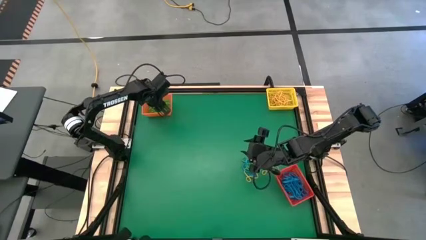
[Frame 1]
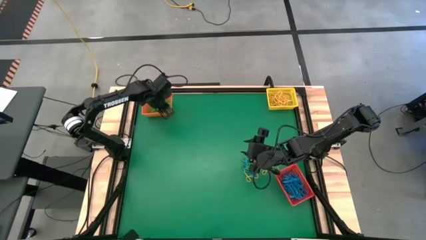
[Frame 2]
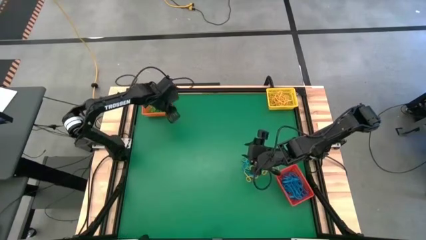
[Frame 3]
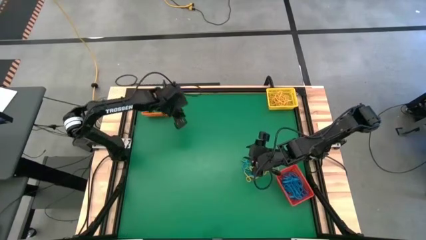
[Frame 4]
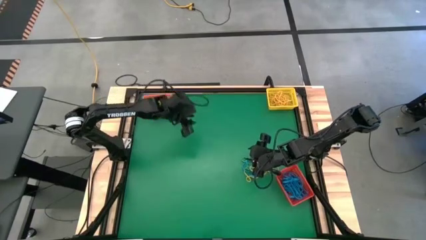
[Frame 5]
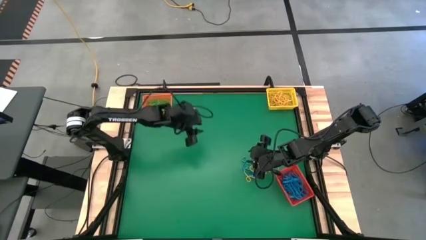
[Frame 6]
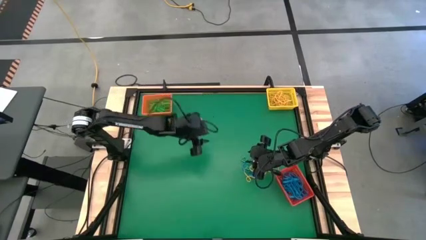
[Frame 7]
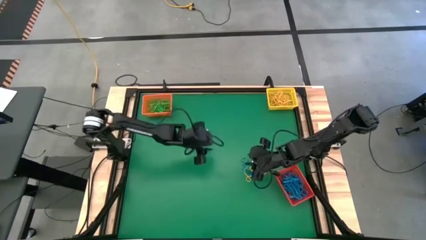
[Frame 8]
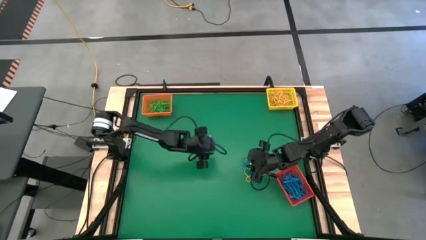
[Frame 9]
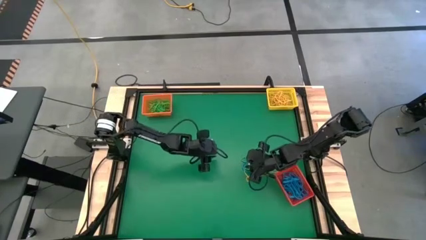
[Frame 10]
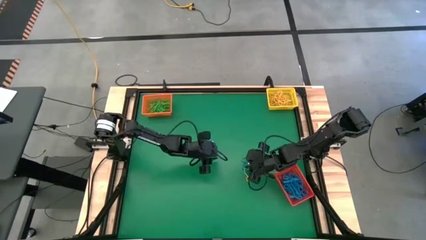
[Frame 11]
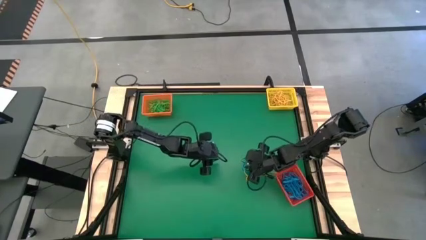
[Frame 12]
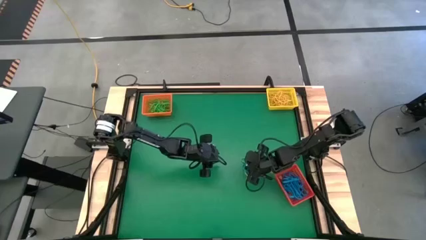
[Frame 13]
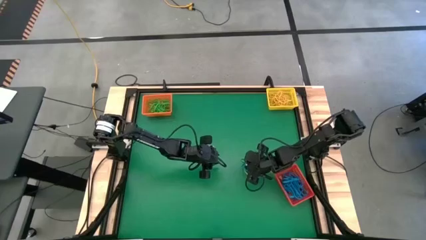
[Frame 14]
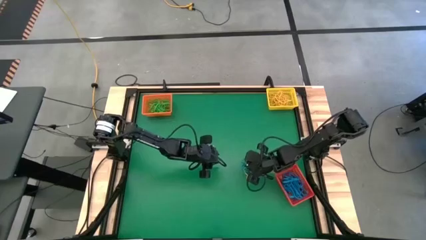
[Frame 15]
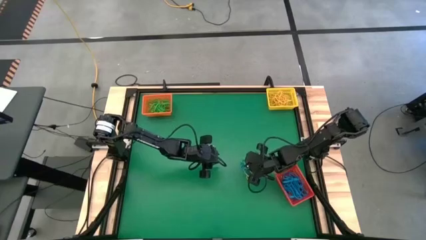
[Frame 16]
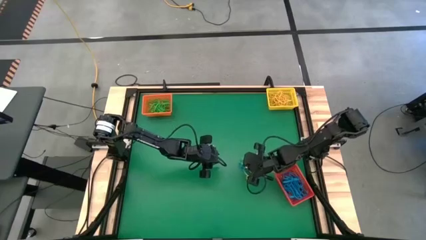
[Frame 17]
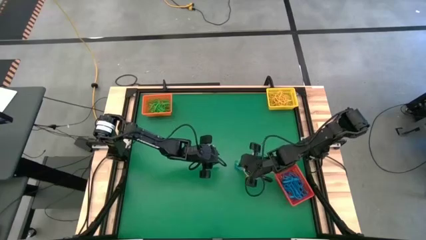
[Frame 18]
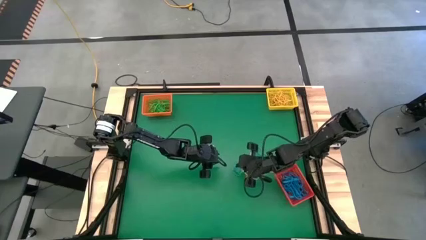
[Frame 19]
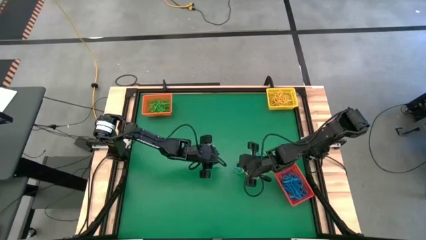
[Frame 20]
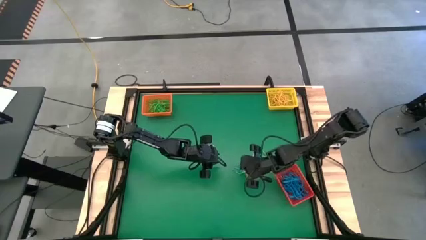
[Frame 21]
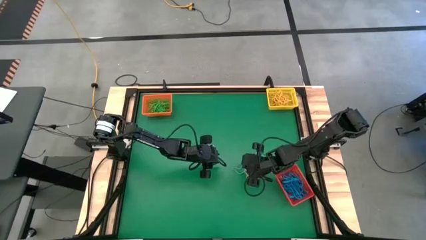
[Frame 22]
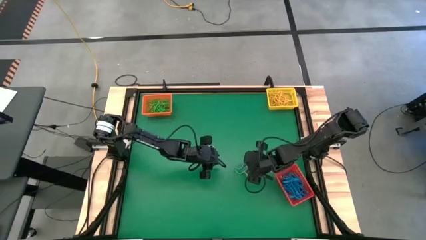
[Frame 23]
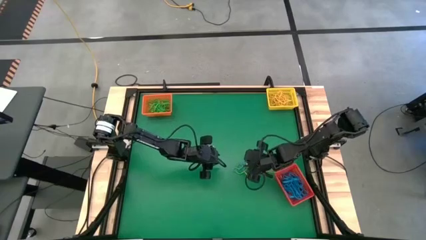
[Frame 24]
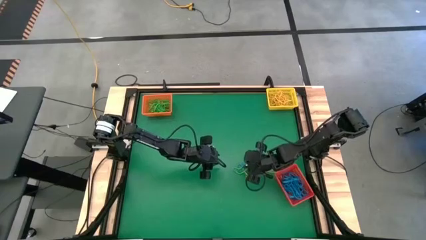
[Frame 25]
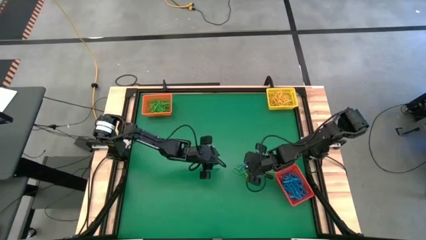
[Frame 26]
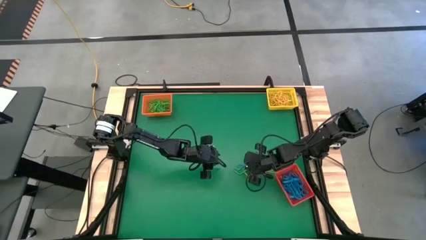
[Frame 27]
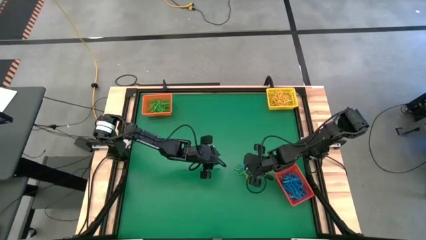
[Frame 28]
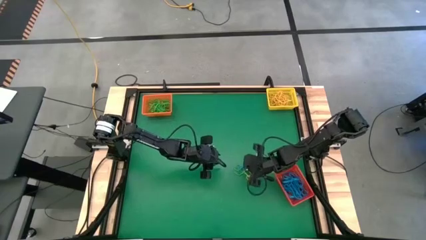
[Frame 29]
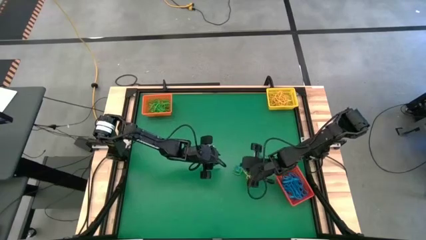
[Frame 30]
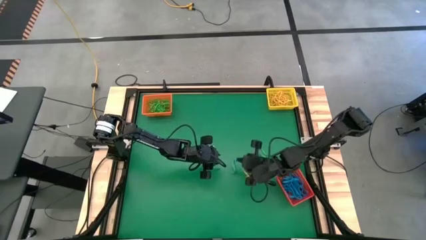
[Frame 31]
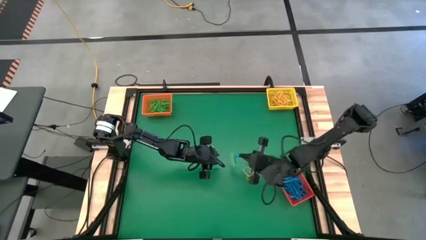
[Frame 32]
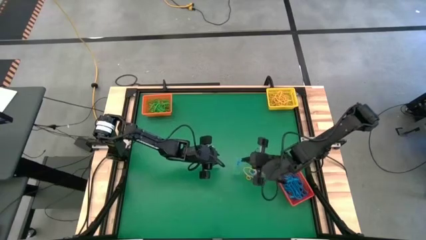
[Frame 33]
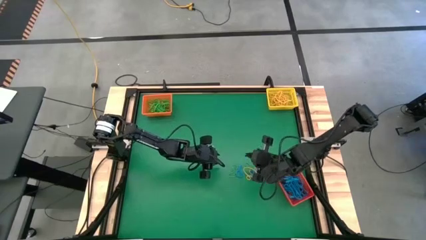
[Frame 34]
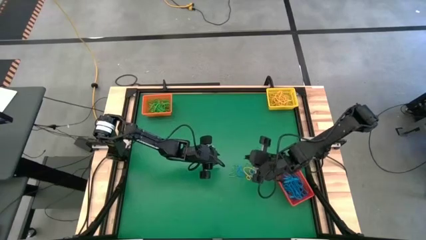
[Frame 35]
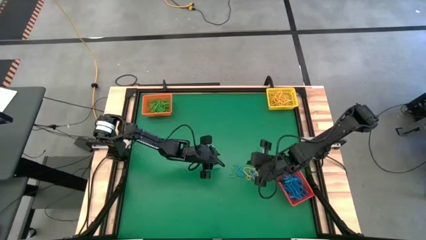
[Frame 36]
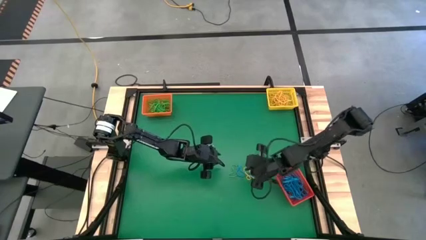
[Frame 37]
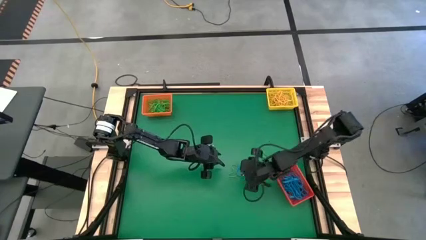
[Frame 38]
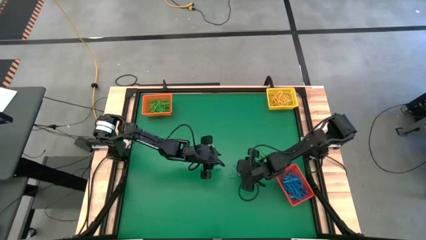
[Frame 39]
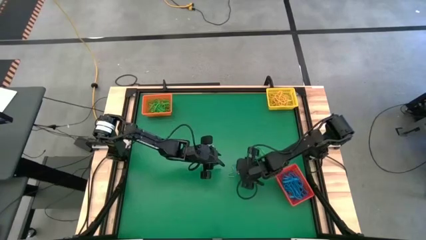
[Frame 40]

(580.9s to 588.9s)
Task: Sort rubber bands into baskets
Put the blue rubber band into the red bin

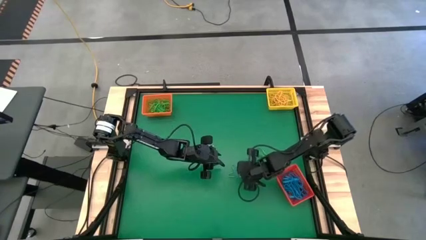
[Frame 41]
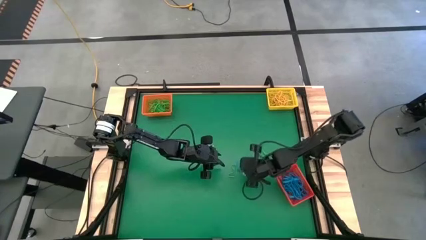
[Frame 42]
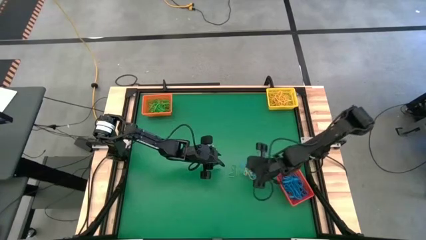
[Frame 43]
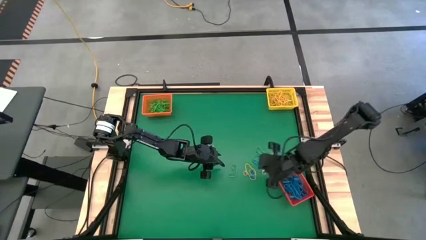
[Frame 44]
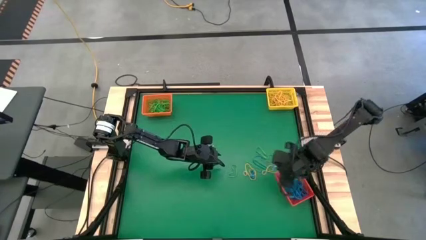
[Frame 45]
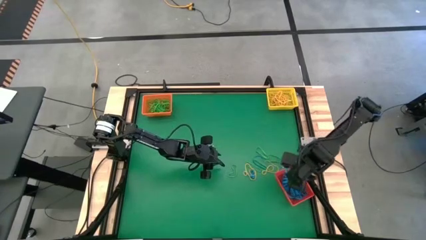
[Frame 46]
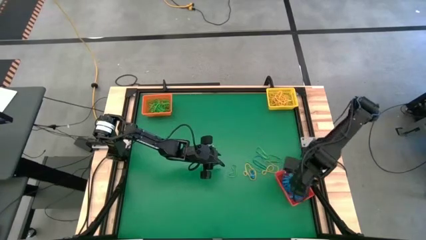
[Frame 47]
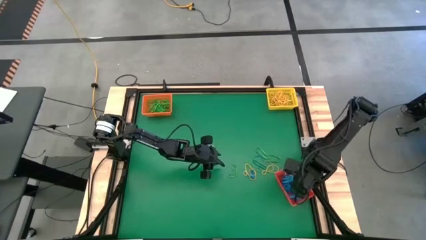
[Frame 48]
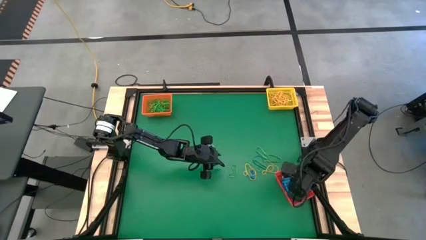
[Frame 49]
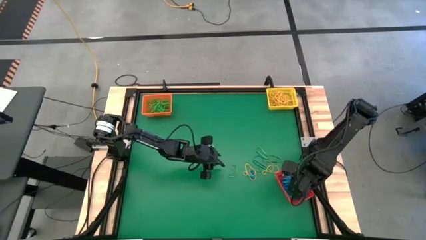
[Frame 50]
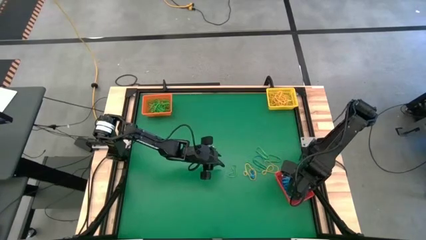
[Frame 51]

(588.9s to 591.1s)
Put the blue rubber band into the red bin

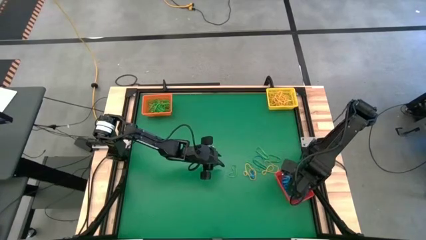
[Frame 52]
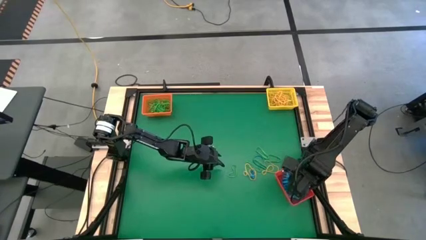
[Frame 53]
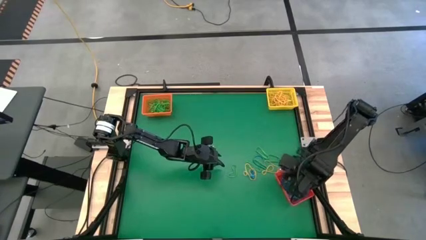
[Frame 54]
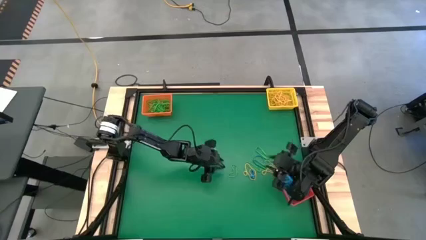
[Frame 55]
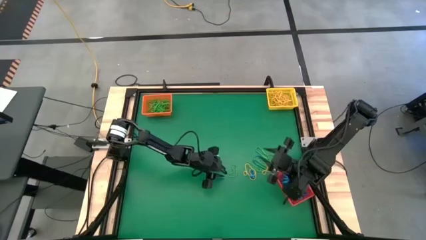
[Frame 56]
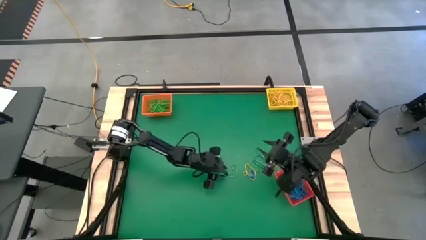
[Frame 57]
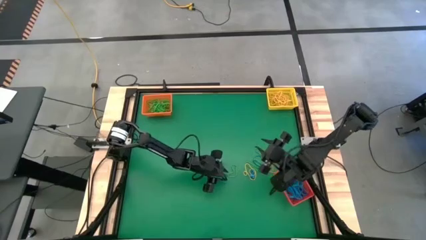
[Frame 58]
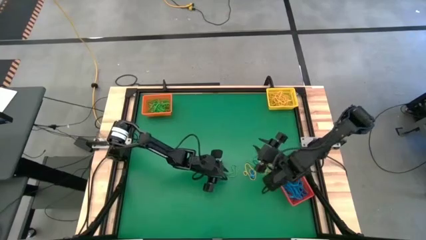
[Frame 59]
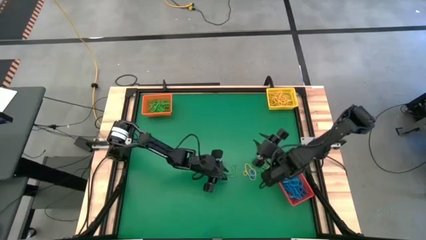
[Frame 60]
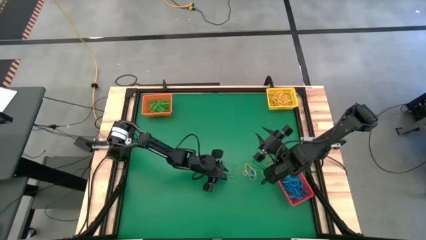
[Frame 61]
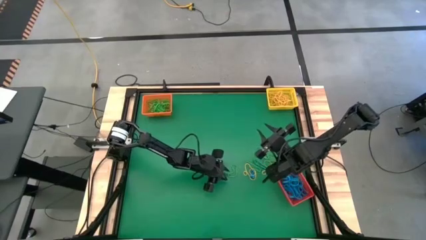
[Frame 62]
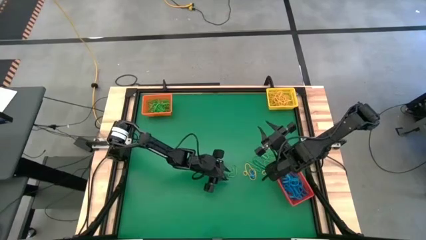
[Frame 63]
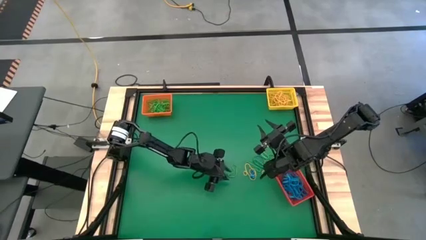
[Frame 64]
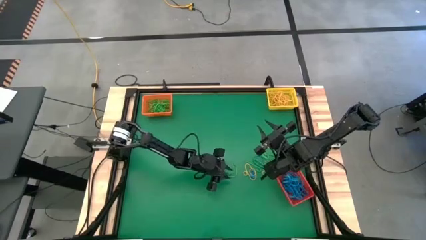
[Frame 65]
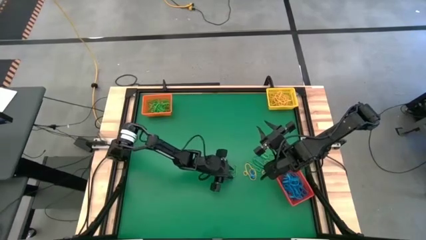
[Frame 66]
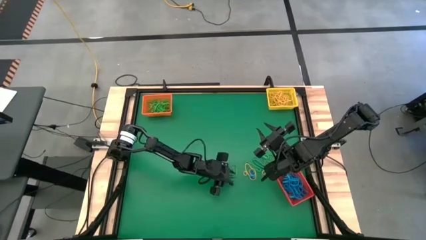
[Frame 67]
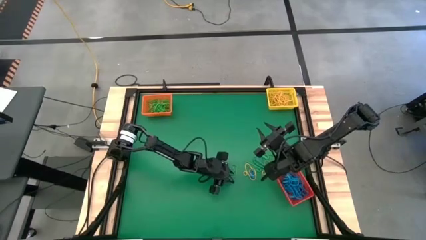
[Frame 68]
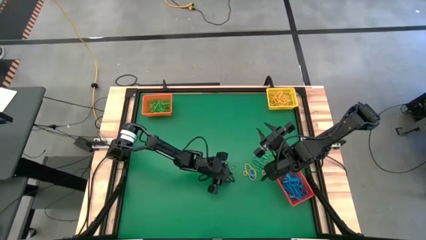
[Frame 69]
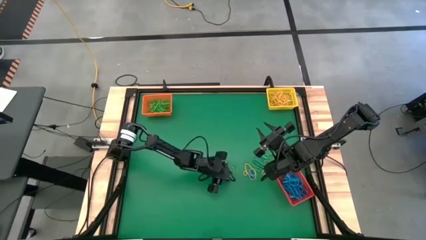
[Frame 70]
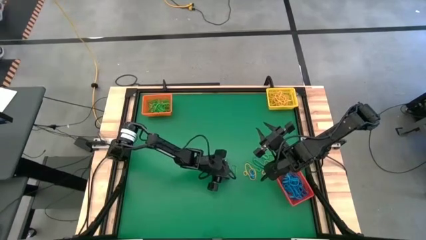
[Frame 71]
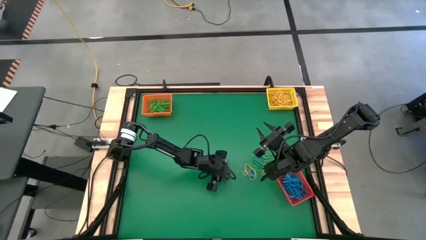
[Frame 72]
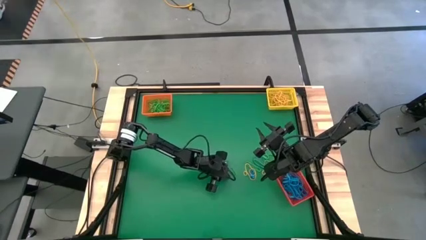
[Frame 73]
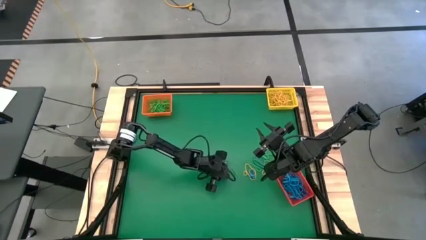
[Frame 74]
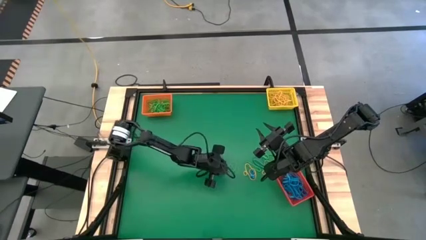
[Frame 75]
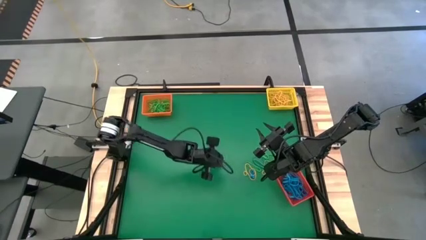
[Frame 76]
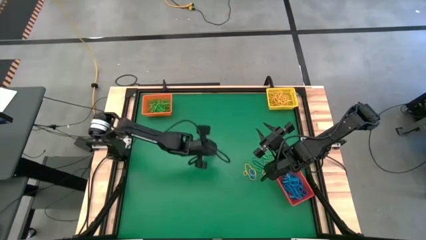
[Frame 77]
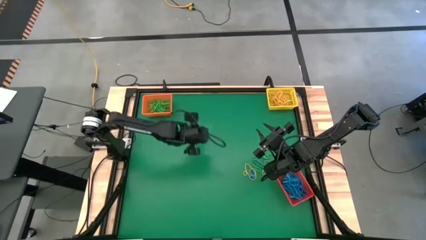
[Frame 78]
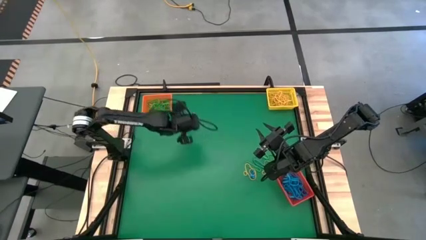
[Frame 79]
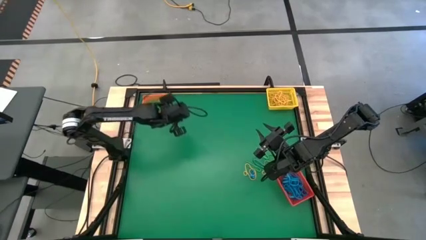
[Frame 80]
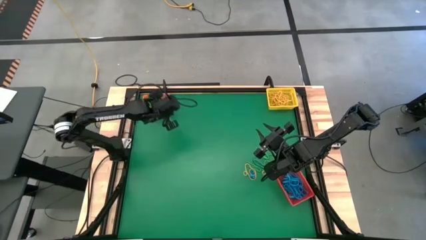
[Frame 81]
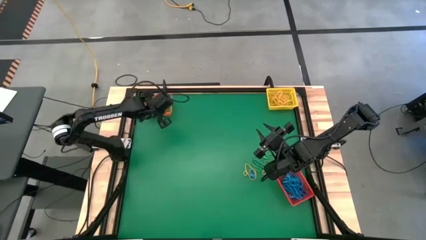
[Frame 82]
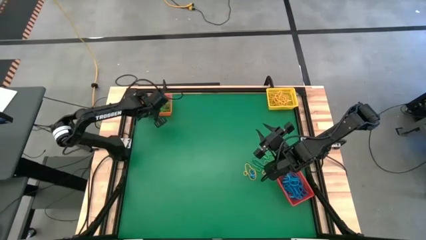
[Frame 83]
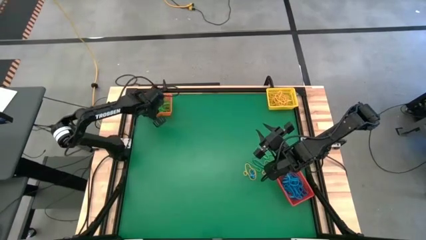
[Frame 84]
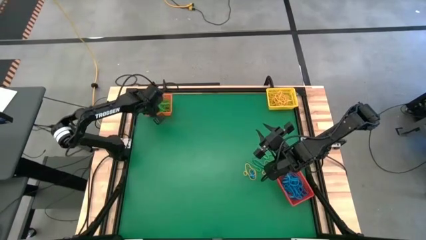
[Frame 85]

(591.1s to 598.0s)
Put the green rubber band into the orange bin
